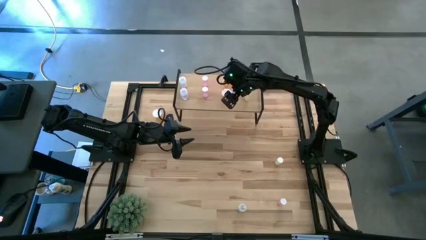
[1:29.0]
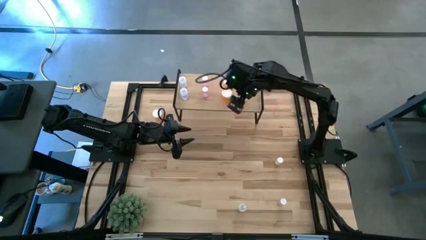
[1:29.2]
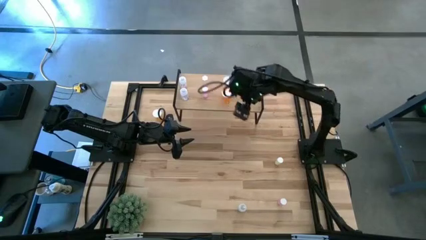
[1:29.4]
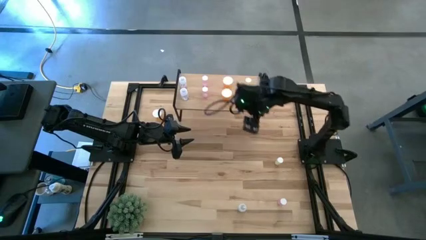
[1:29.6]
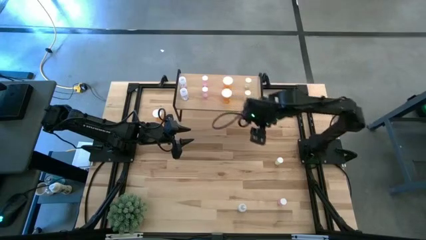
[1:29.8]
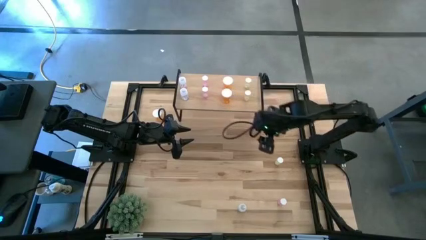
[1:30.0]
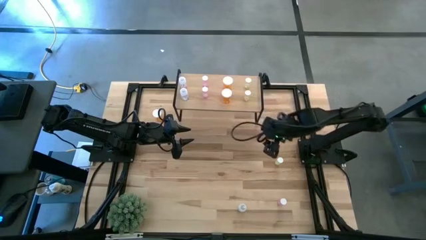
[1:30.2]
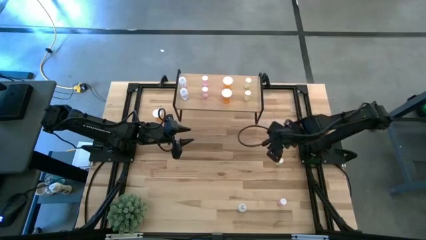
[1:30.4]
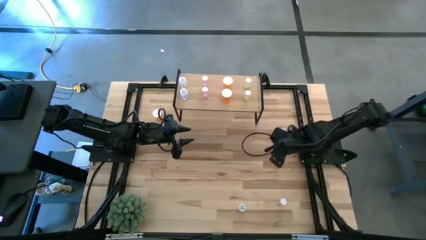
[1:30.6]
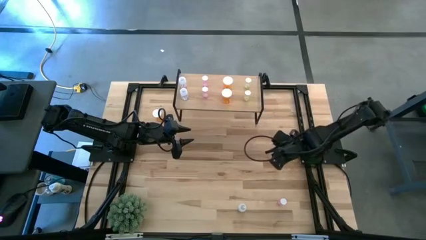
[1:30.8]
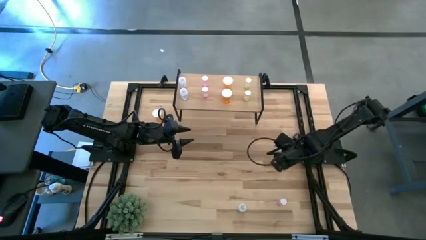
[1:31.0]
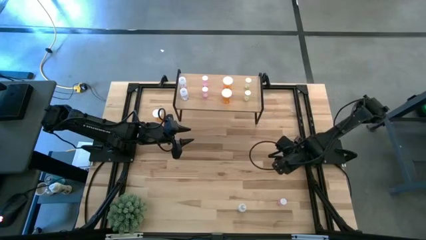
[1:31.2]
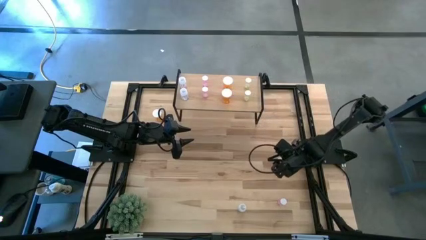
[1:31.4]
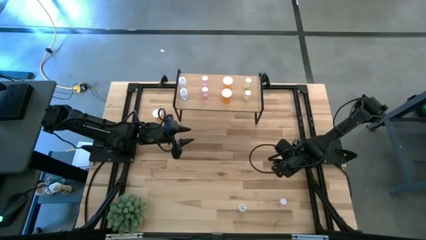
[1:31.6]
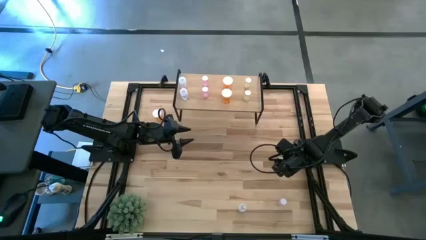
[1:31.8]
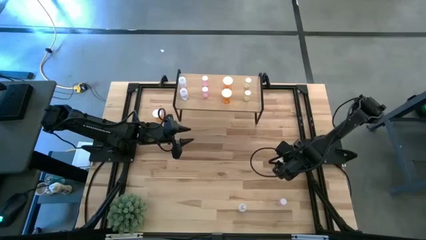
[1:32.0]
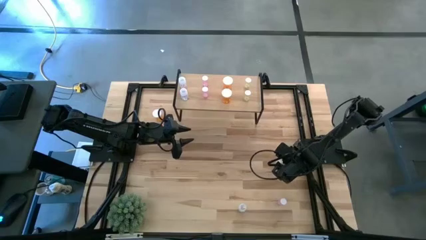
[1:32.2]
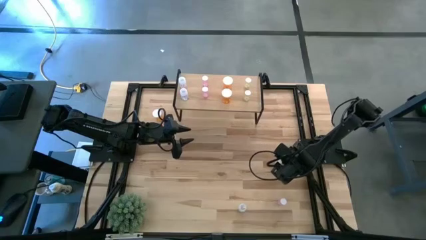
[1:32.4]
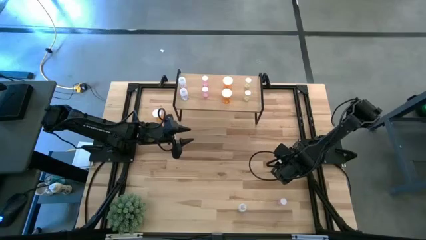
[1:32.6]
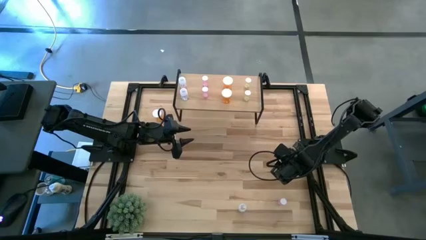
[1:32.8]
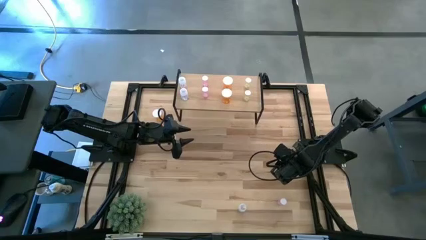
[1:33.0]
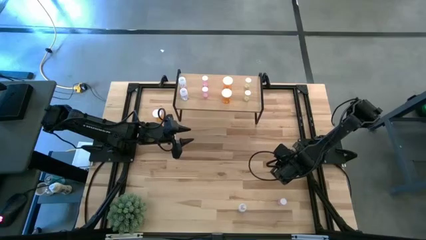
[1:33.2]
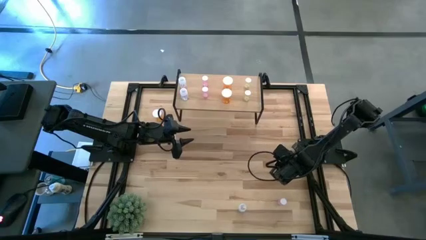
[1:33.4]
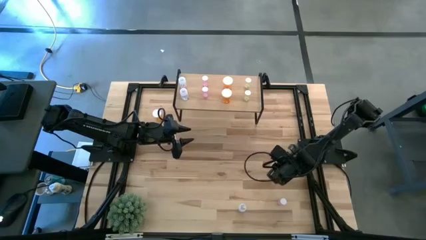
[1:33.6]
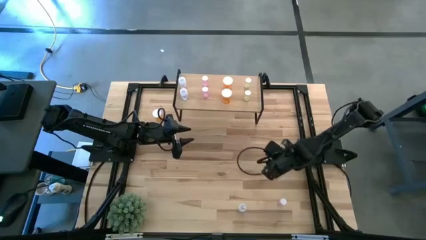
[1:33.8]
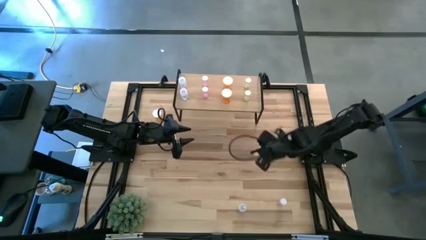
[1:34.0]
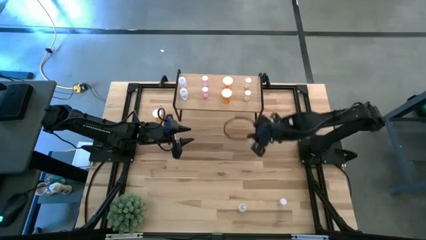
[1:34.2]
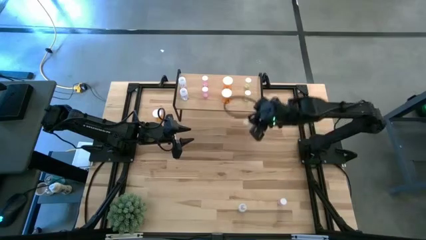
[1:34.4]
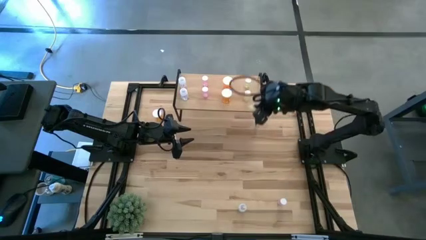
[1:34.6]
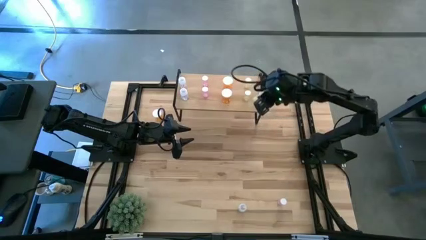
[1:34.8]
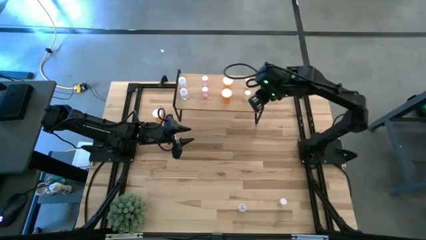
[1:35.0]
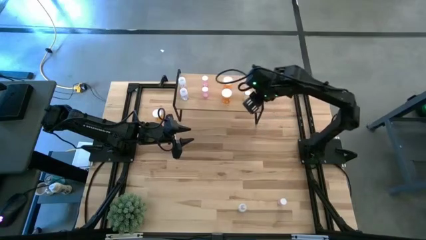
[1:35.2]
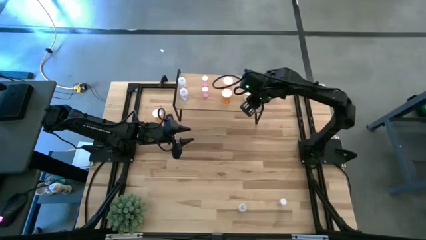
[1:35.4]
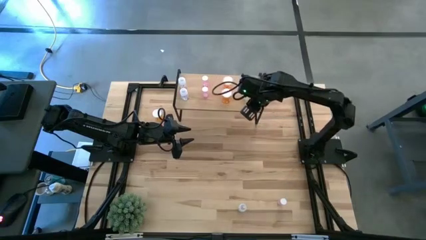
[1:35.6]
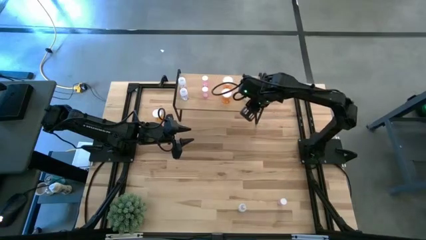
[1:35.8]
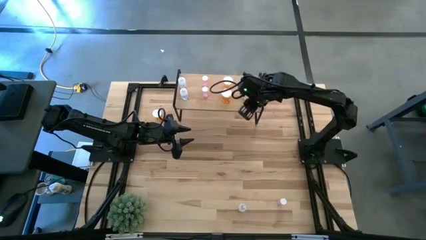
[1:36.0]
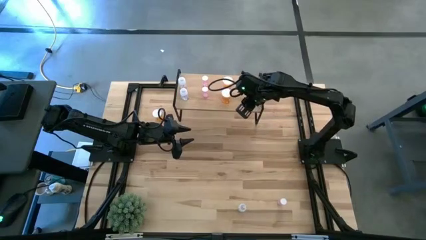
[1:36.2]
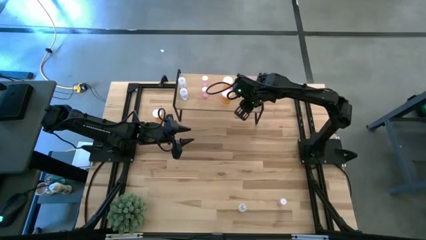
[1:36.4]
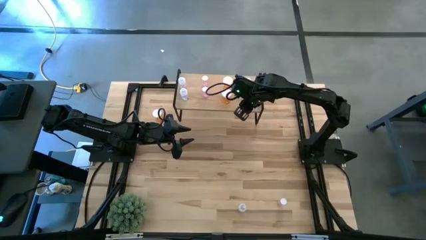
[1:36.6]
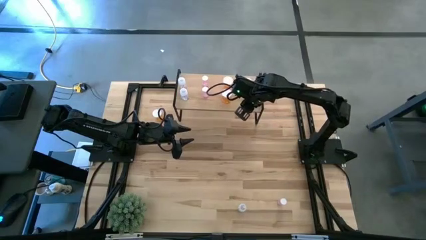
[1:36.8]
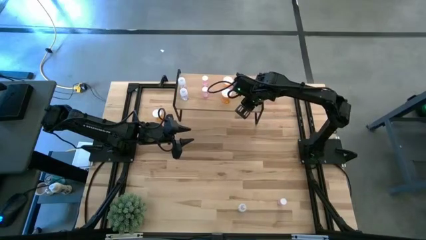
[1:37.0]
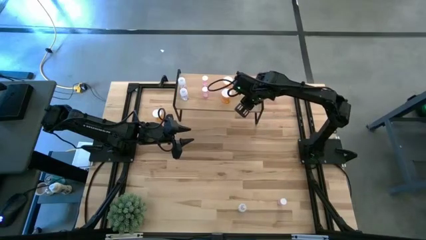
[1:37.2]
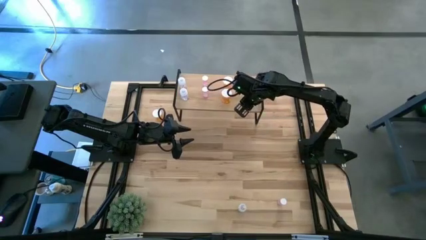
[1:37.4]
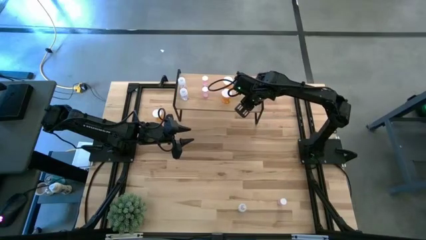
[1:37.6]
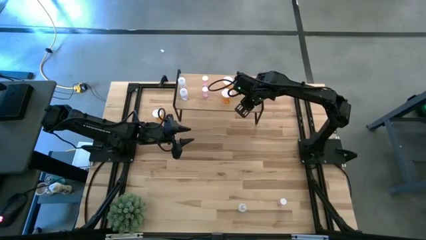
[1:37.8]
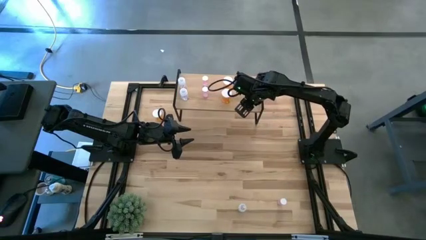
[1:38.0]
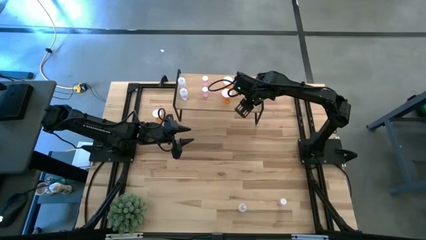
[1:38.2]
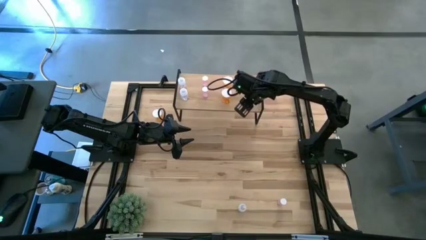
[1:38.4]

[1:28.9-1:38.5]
Task: Pick and place medicine bottles onto shelf by color
Put the yellow pill bottle on the shelf aligned with the other yellow pill bottle

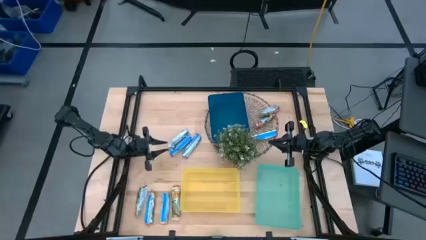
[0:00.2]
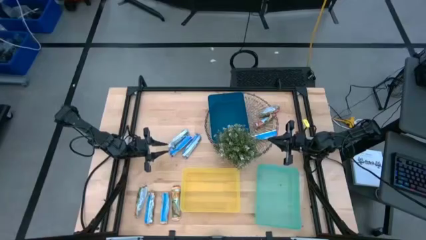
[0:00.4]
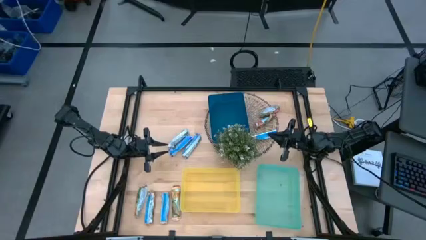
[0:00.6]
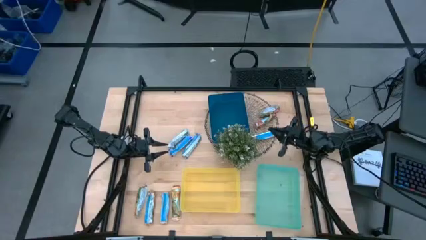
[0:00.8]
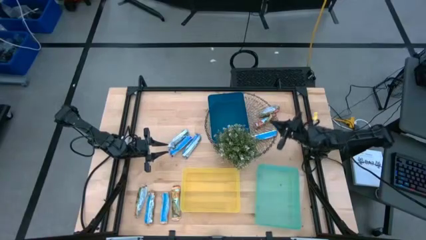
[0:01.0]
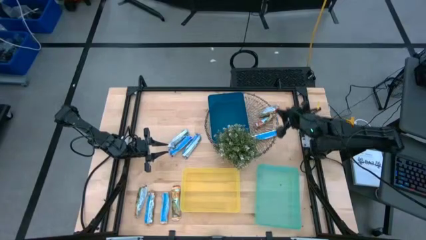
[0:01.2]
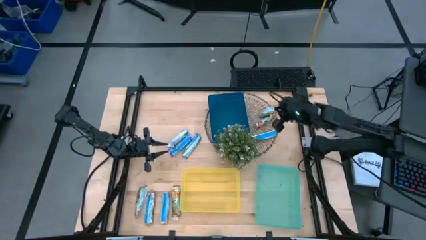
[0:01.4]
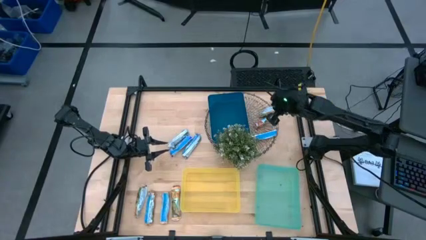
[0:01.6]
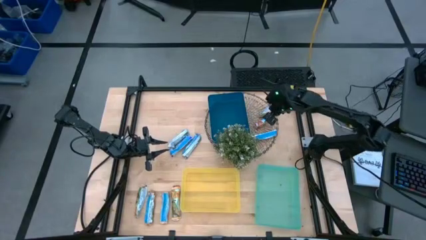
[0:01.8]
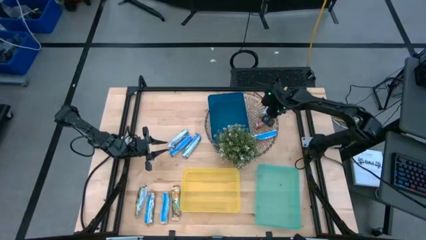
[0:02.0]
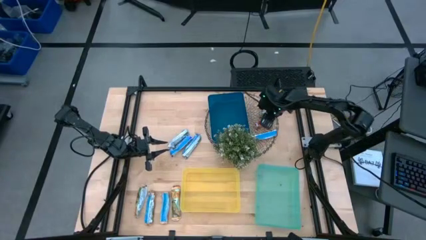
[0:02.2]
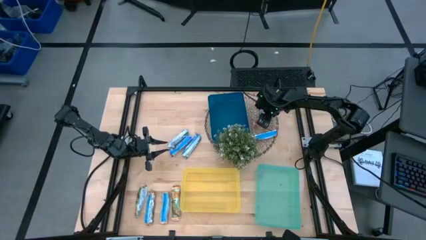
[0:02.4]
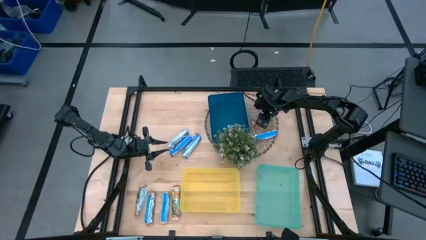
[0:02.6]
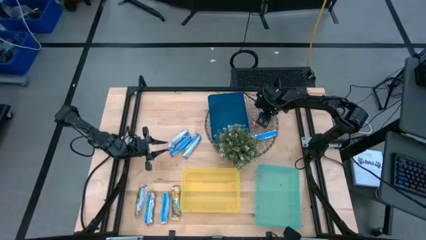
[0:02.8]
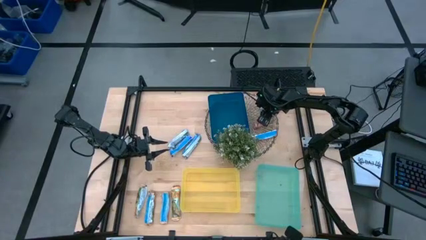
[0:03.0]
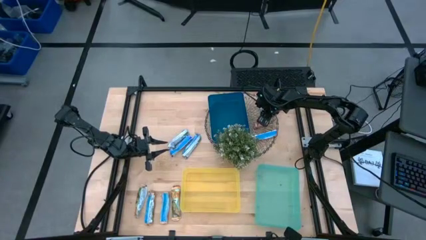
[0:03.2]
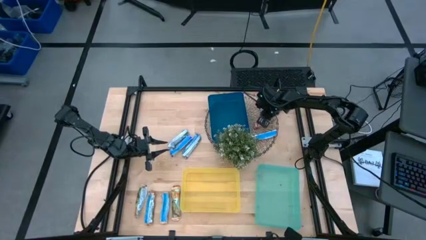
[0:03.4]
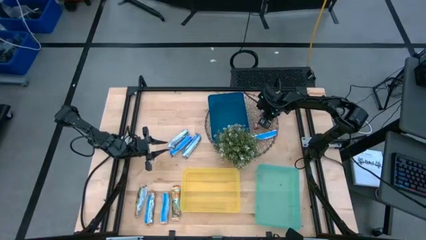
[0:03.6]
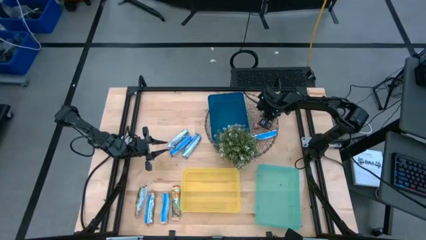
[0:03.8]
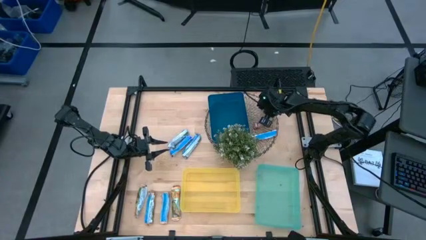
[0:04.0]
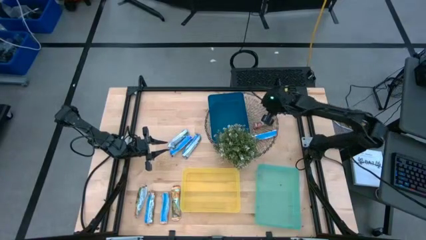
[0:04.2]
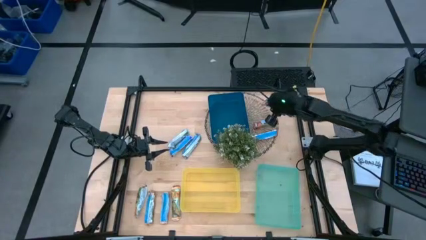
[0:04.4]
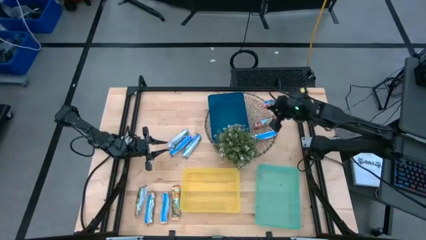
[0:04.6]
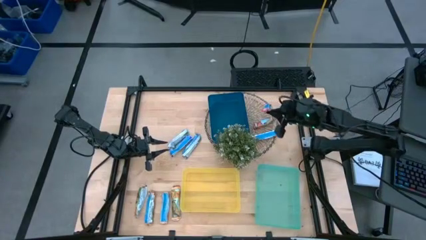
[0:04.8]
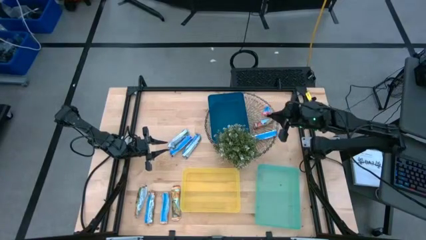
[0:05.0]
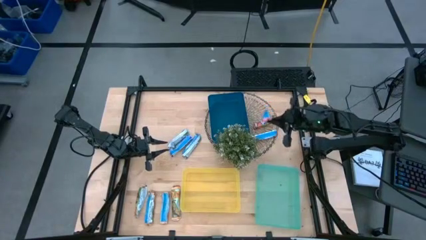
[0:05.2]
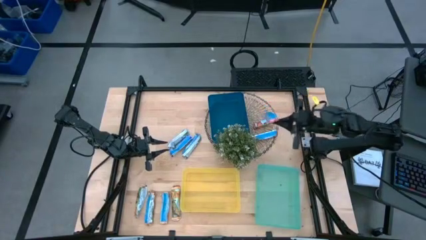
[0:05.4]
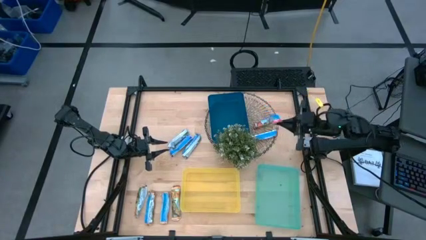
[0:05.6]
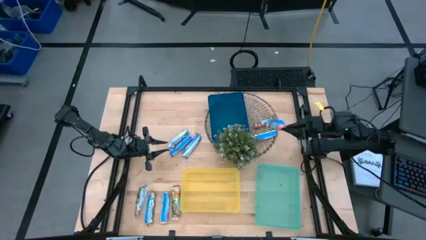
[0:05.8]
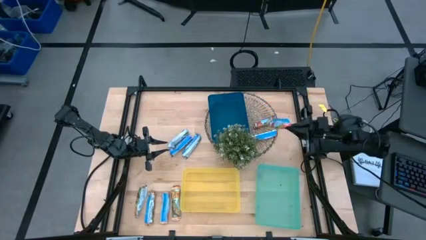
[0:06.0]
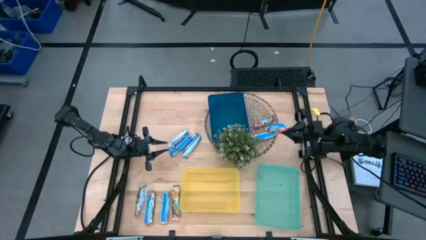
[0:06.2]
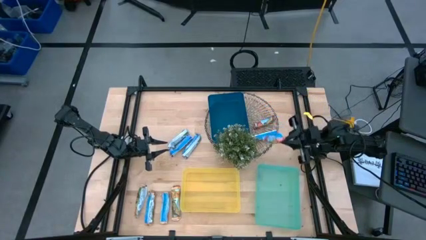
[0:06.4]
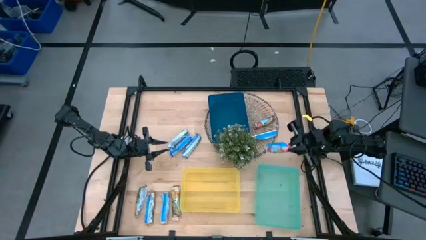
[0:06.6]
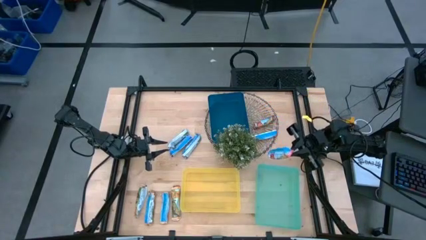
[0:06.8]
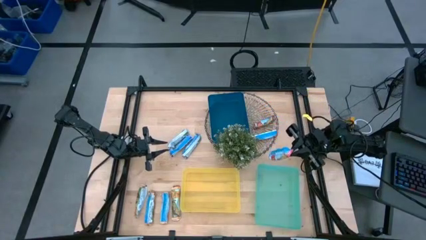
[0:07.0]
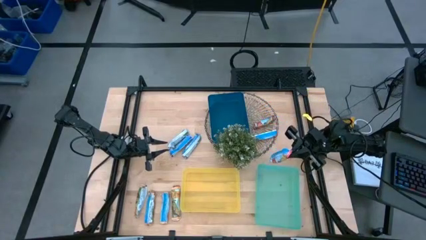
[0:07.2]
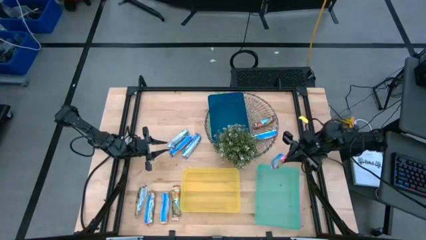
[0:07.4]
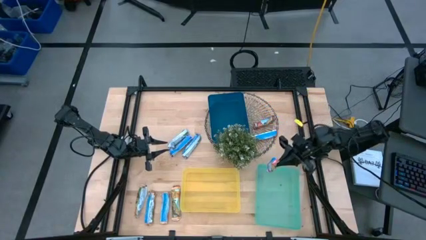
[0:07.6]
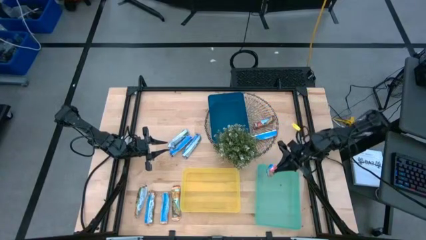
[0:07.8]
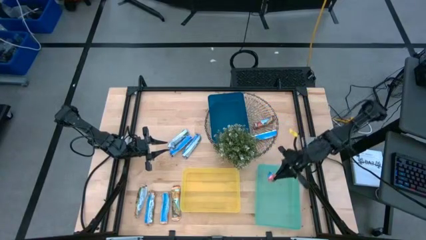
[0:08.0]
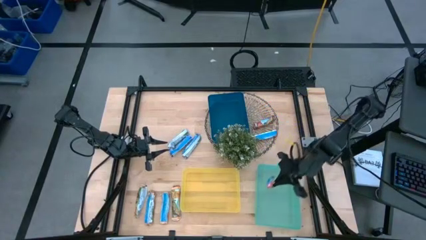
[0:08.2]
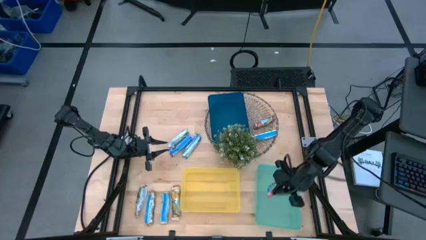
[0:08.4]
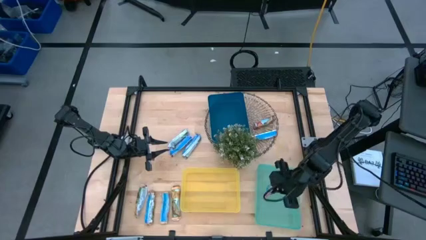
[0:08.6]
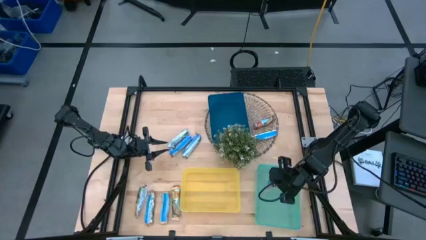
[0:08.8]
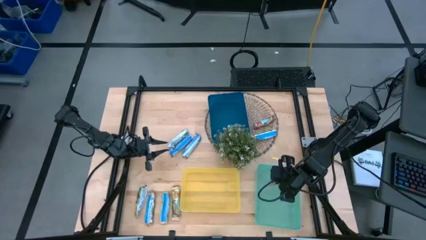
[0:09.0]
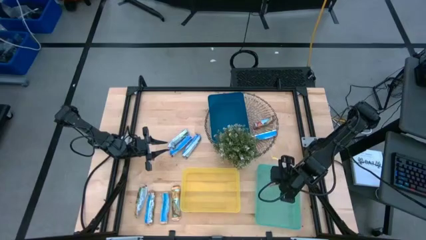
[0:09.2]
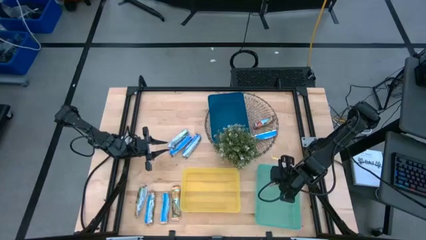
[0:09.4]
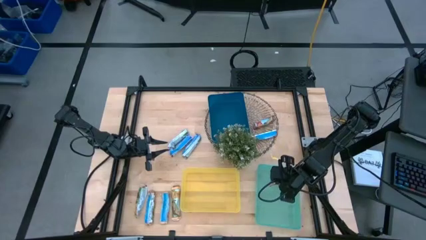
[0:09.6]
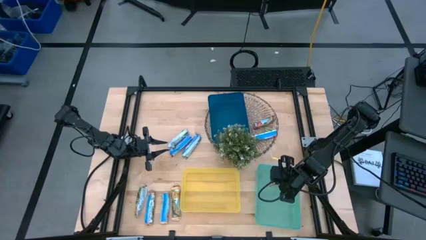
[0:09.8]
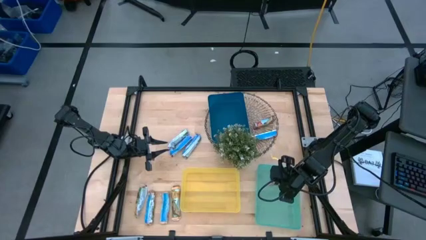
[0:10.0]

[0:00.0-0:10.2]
Task: Pick and place Granola Bars by type
Put the green granola bar into the light green bin
